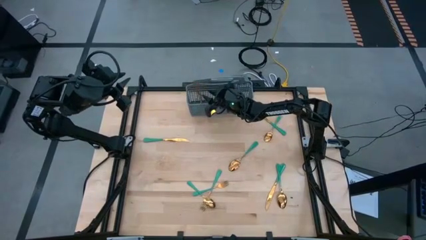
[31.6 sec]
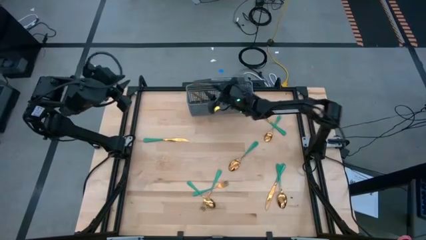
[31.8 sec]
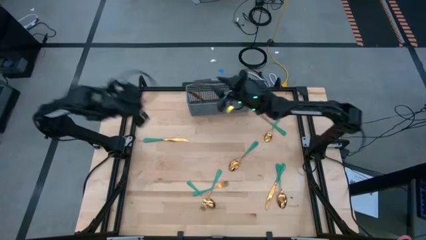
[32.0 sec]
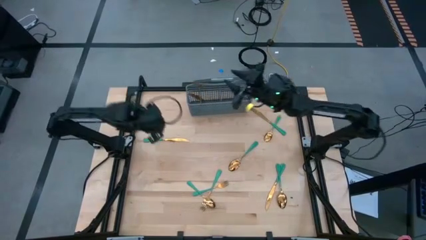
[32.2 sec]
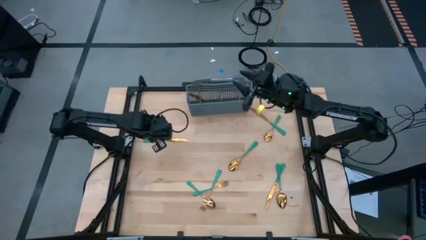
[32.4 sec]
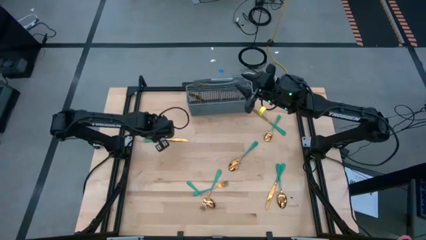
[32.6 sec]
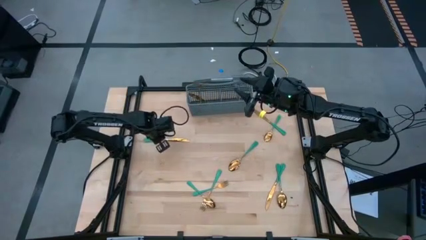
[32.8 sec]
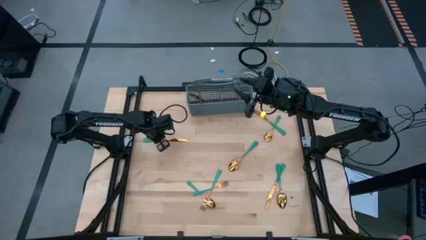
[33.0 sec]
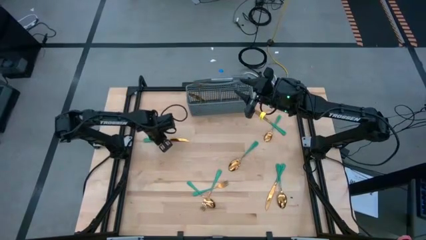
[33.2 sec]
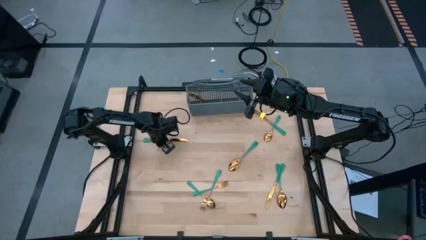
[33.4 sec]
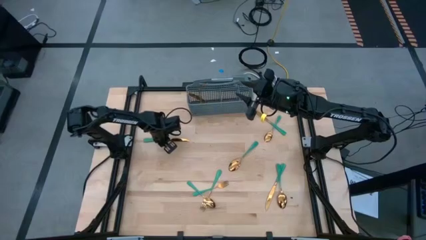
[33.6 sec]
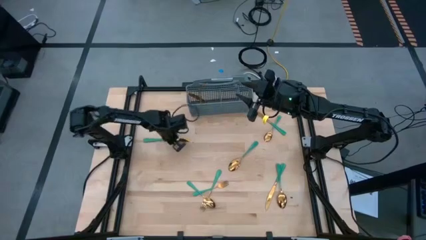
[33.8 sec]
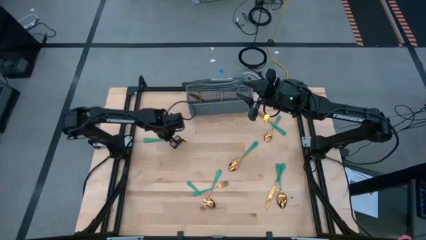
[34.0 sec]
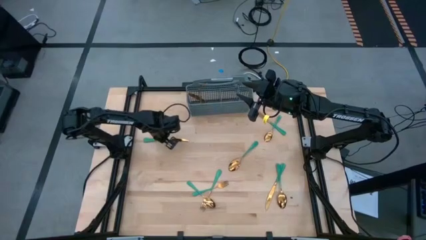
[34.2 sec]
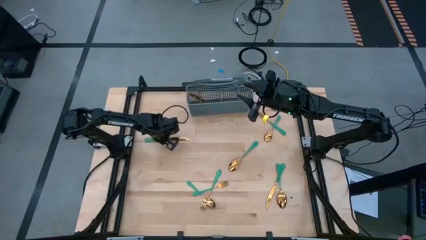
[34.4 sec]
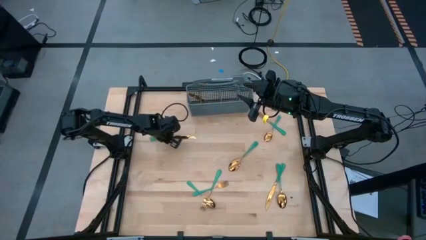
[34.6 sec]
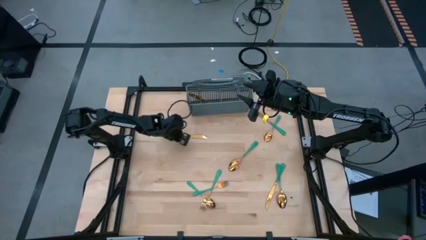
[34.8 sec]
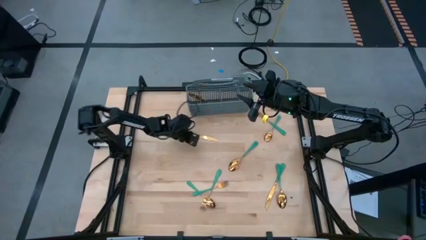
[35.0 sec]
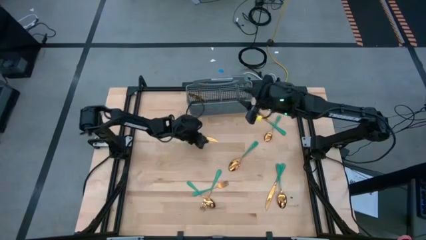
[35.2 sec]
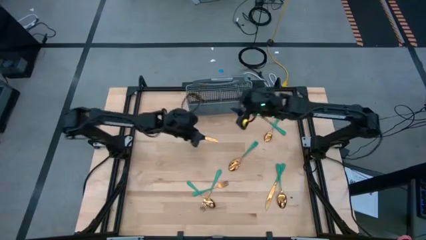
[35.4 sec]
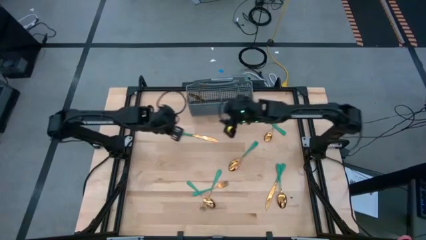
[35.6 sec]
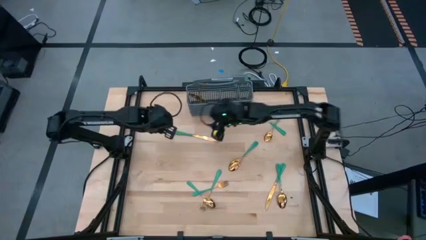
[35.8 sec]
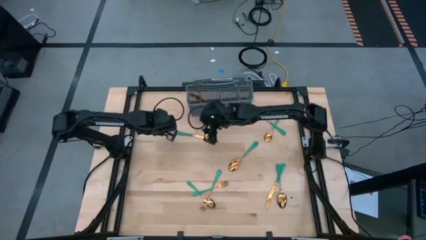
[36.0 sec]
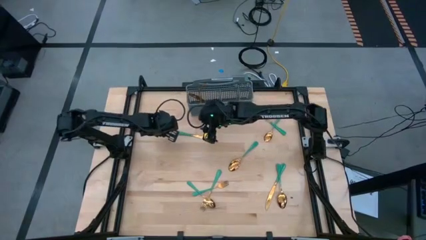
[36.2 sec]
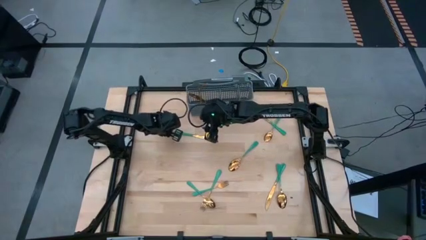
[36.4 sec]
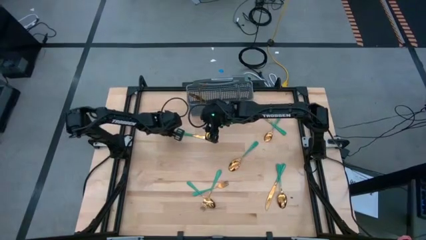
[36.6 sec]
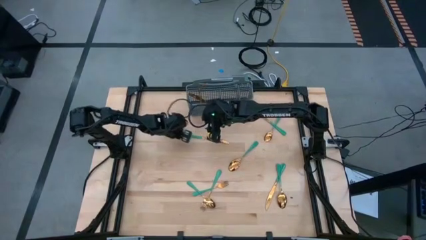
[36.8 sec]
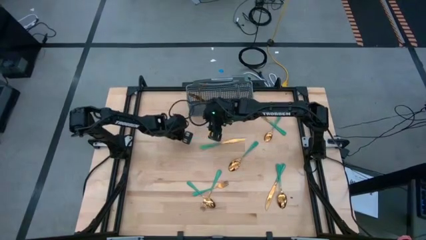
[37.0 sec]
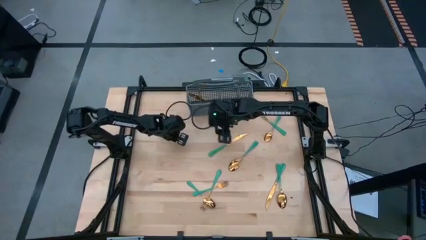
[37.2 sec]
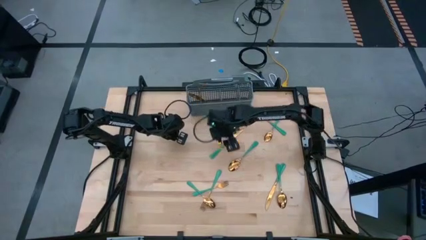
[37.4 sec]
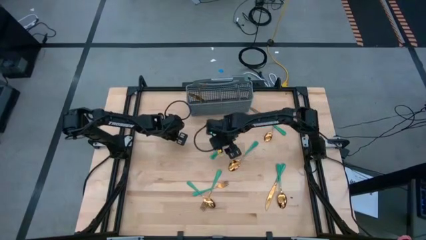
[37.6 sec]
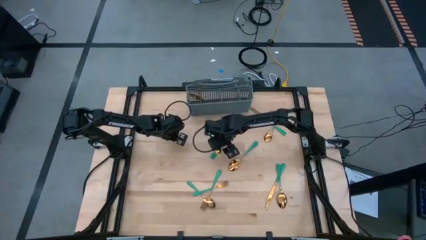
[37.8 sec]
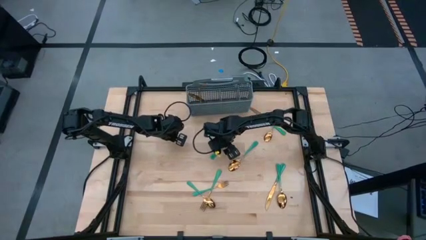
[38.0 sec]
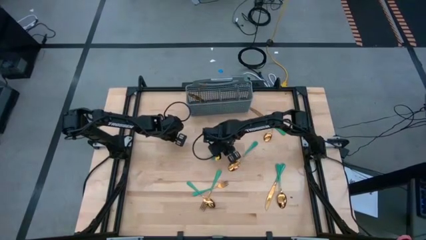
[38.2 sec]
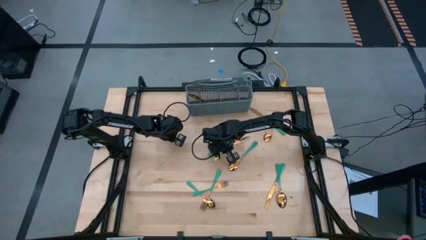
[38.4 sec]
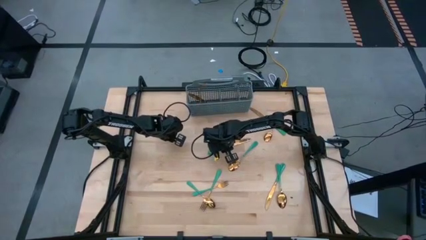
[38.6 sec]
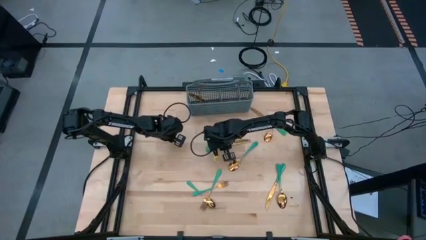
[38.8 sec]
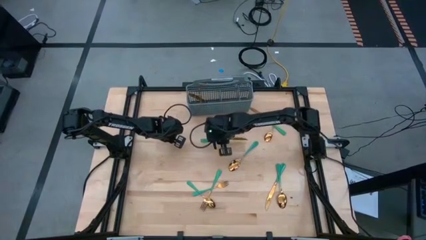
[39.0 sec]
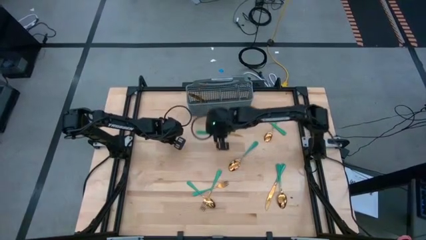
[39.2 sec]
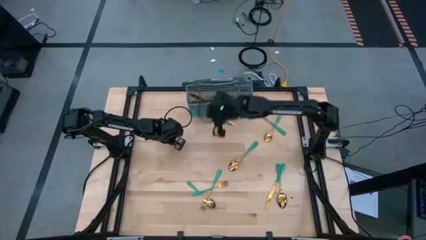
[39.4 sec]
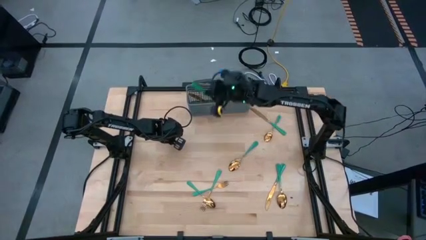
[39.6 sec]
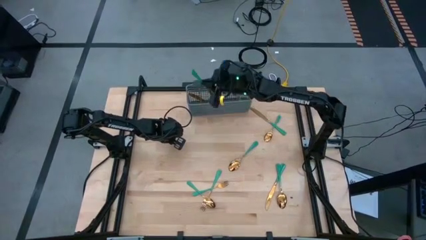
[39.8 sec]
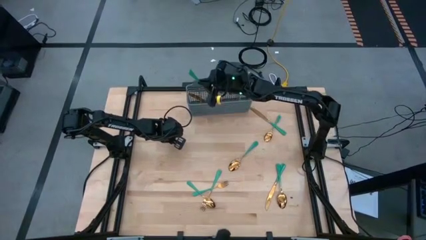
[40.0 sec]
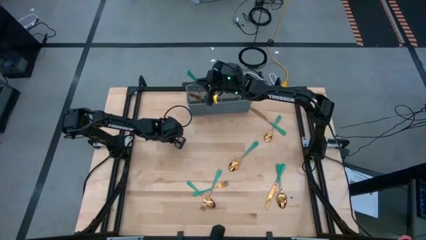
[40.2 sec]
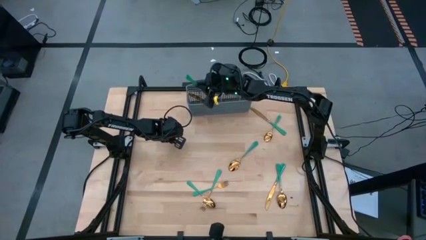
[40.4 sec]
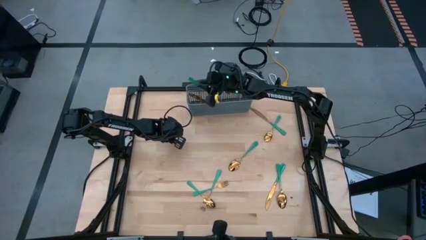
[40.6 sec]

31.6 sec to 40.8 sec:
Task: Sort silverware
Put the gold knife into the middle left section of the gray utensil holder

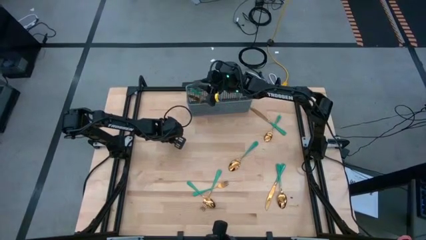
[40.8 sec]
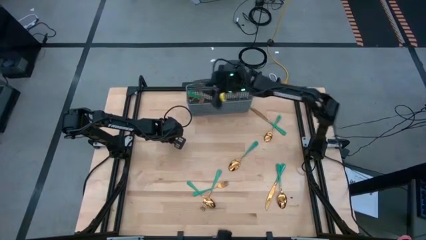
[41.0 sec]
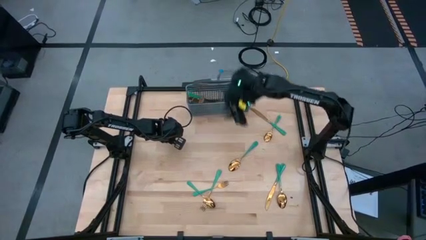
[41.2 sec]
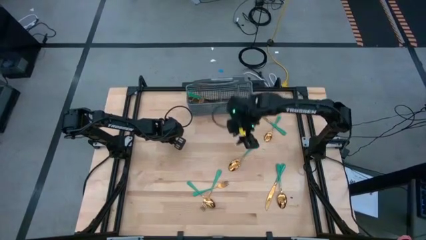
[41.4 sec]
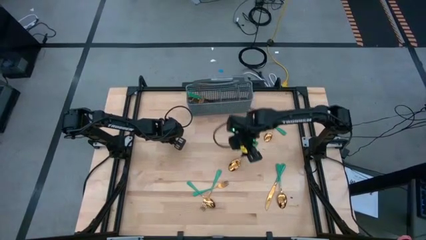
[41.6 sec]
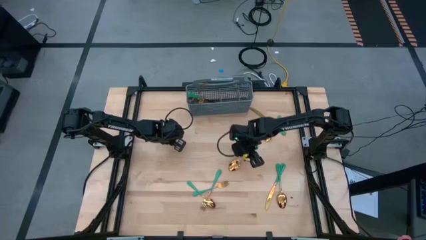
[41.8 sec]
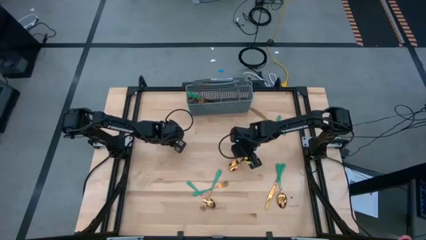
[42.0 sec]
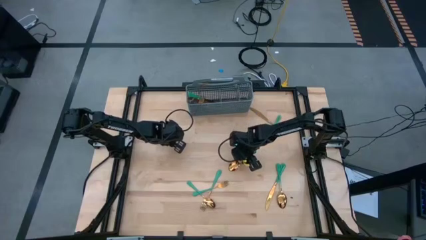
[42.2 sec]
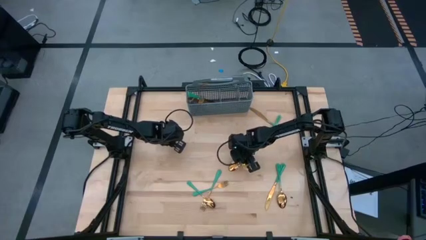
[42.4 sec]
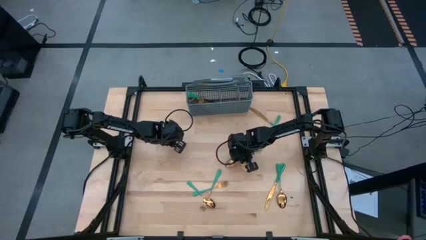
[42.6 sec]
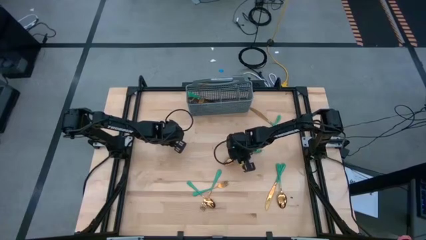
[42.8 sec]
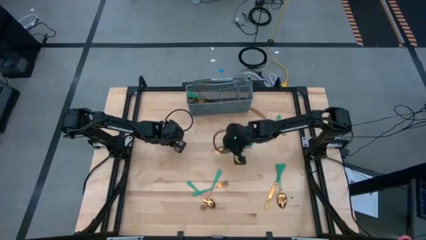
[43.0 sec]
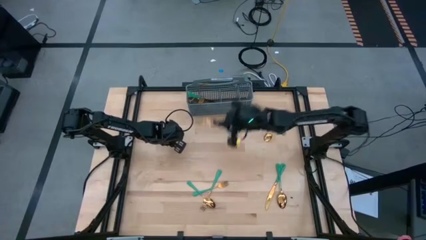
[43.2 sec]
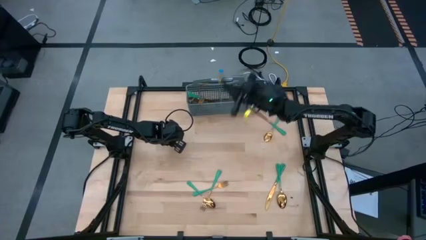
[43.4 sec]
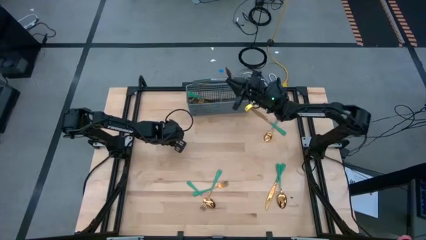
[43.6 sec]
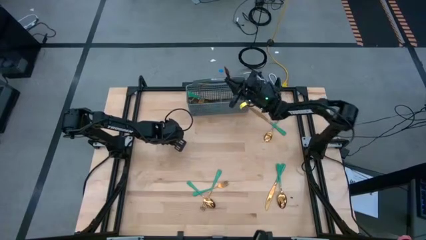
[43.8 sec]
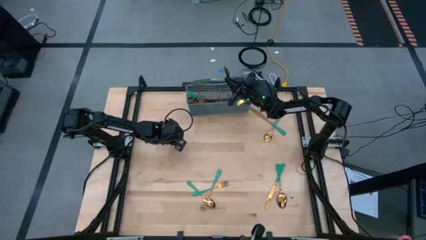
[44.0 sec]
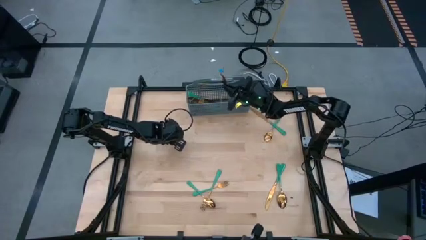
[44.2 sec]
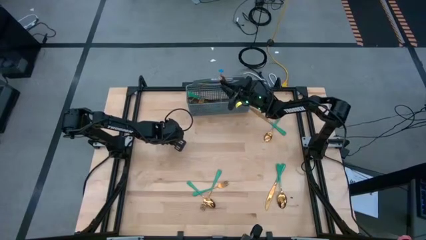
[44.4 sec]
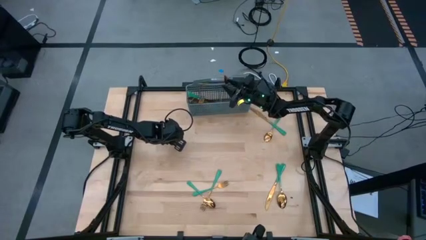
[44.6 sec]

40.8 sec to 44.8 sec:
Put the gold spoon into the middle right section of the gray utensil holder

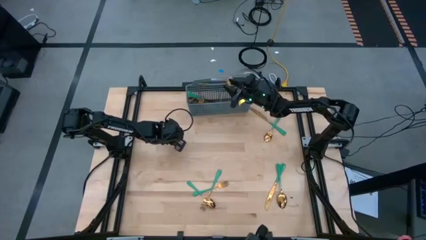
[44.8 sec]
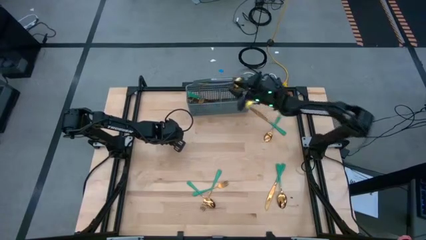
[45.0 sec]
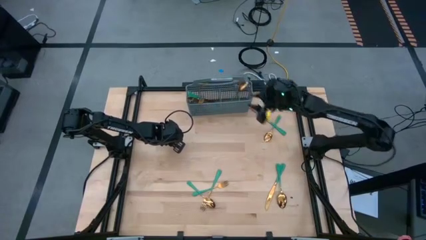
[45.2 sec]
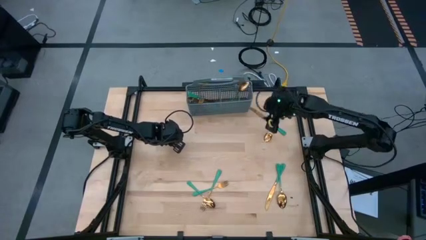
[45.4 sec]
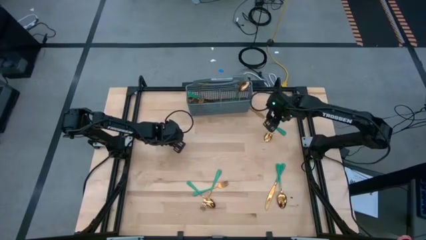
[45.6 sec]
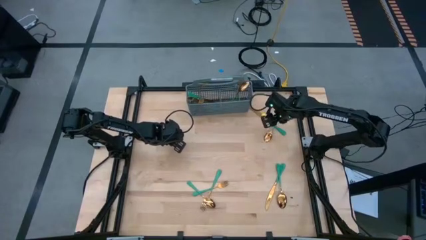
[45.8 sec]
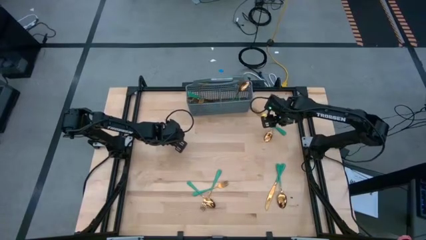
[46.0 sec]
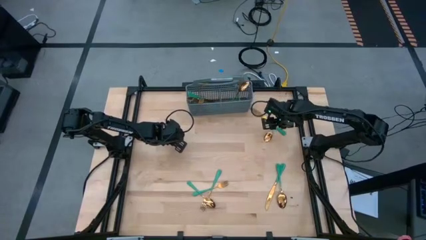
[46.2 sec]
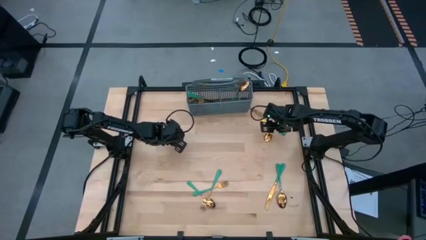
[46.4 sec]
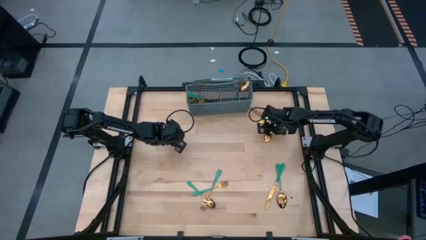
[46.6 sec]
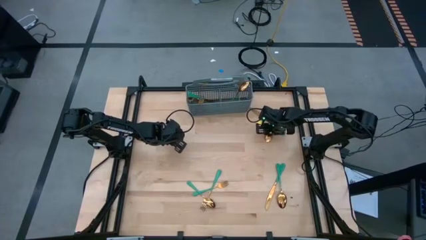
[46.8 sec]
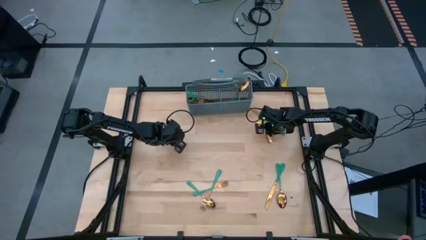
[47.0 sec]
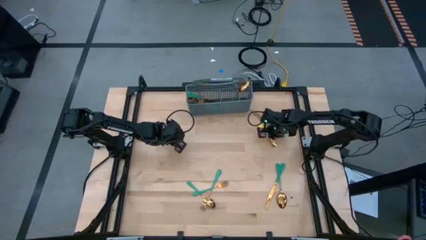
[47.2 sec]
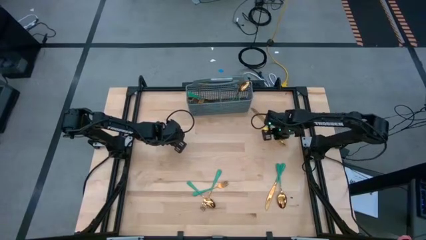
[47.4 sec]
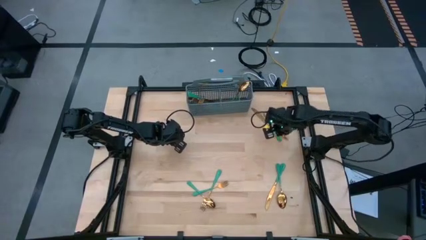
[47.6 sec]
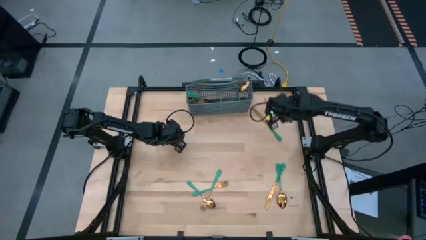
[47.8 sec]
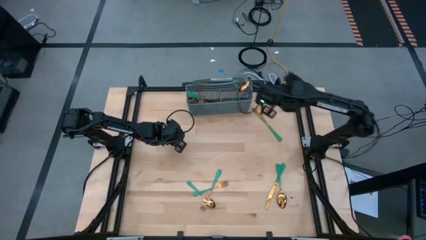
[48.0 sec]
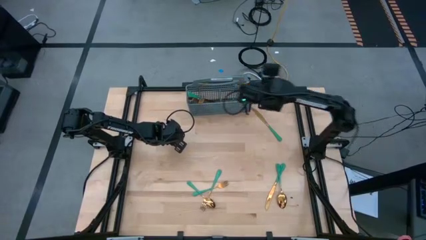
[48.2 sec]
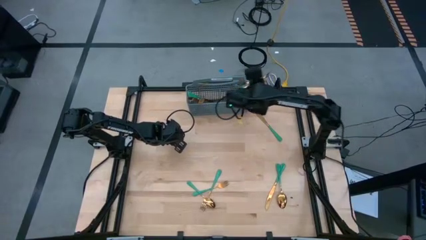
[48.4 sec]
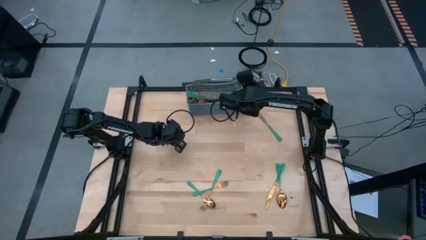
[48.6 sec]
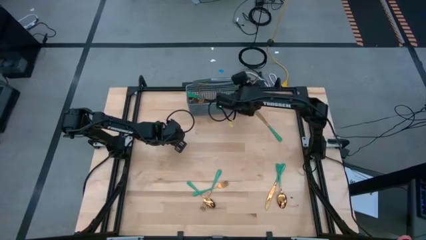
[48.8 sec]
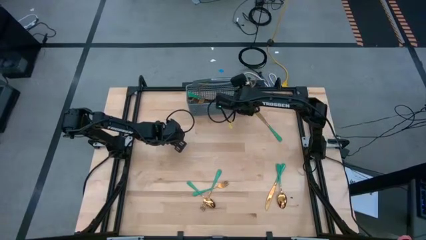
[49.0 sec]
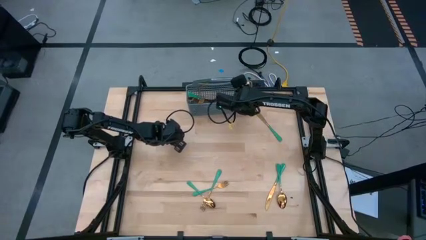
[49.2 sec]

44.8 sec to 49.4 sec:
Put the gold spoon into the middle right section of the gray utensil holder
